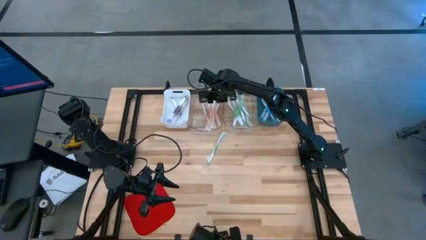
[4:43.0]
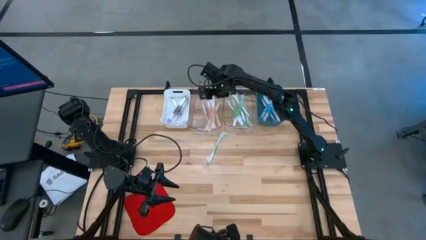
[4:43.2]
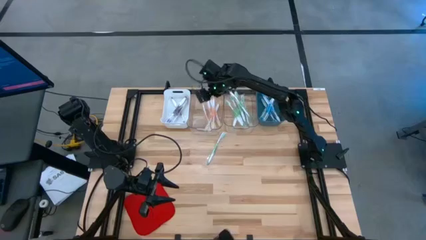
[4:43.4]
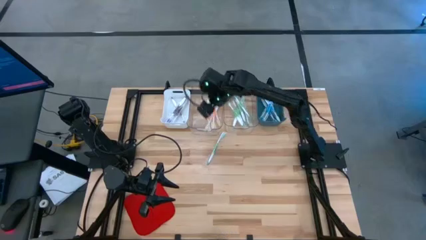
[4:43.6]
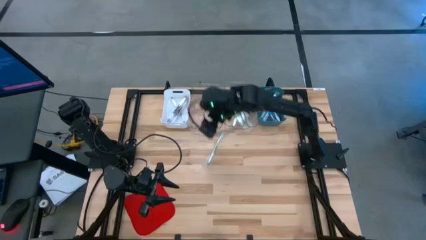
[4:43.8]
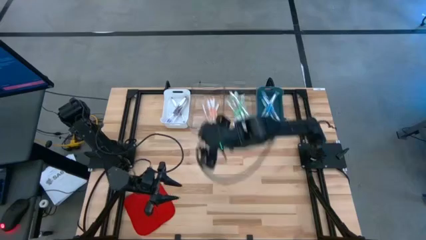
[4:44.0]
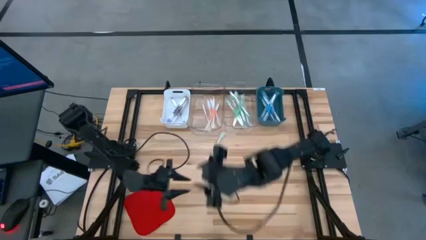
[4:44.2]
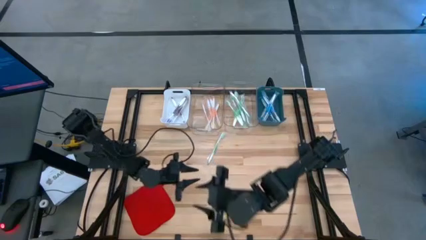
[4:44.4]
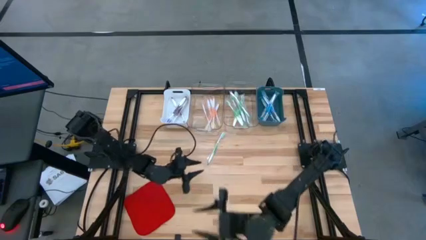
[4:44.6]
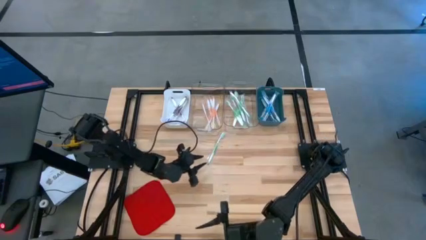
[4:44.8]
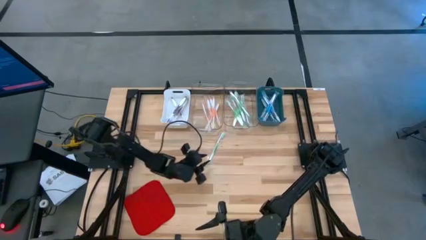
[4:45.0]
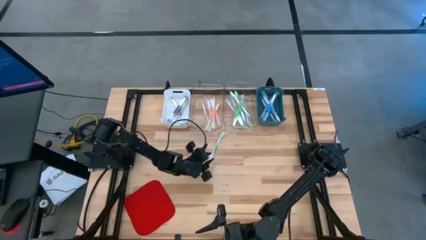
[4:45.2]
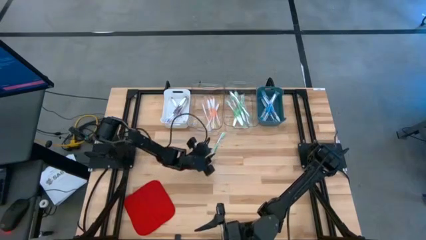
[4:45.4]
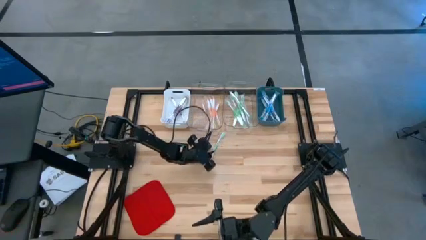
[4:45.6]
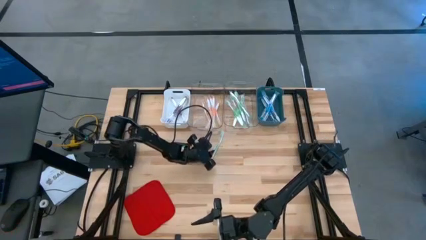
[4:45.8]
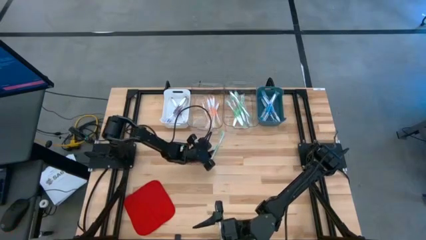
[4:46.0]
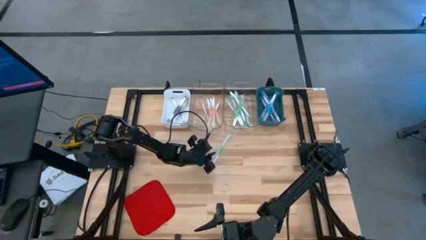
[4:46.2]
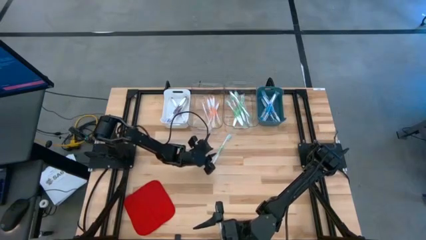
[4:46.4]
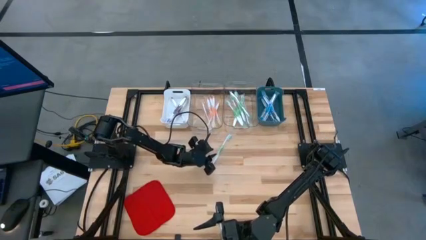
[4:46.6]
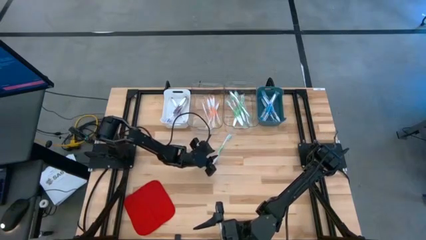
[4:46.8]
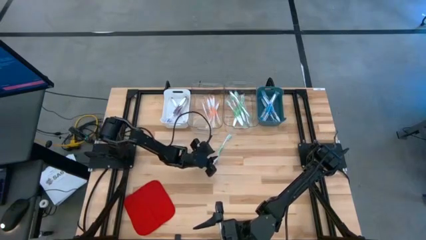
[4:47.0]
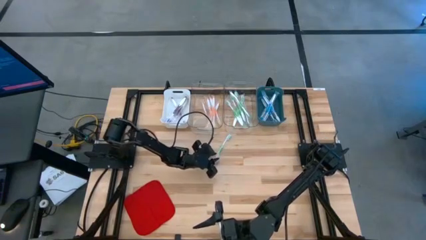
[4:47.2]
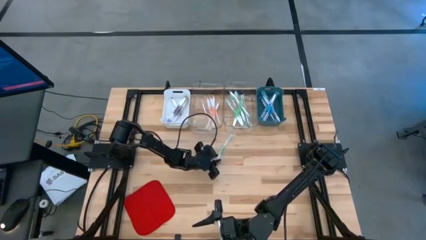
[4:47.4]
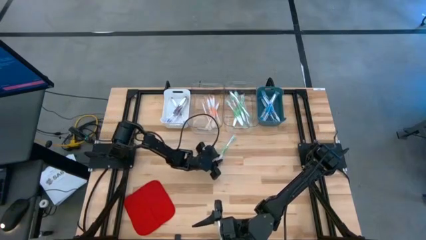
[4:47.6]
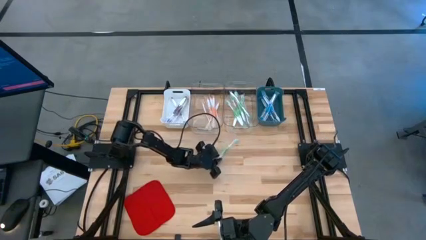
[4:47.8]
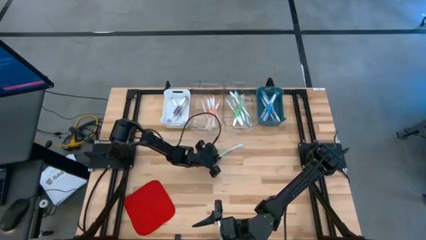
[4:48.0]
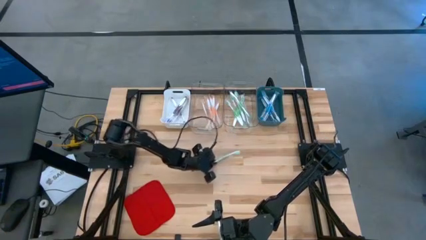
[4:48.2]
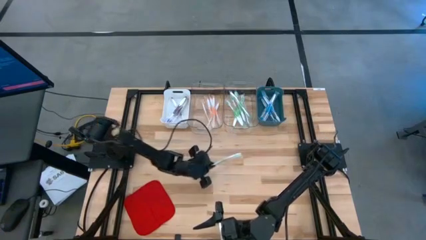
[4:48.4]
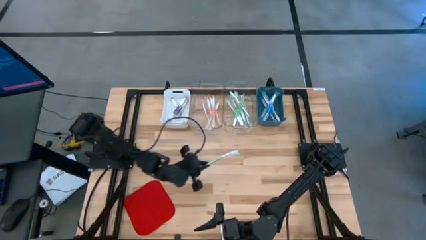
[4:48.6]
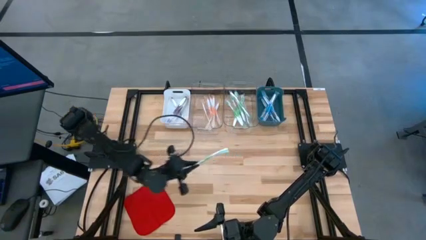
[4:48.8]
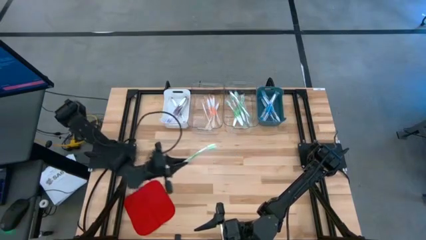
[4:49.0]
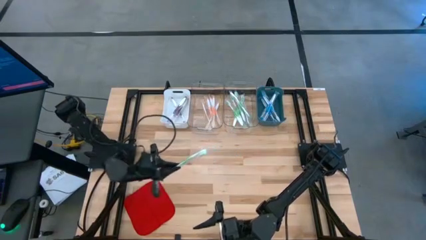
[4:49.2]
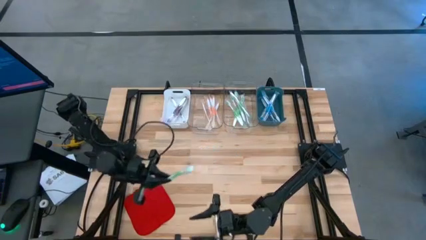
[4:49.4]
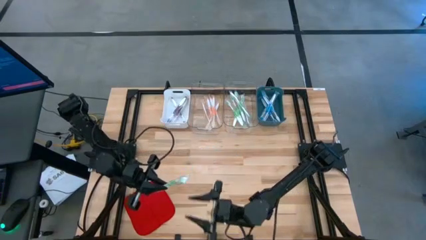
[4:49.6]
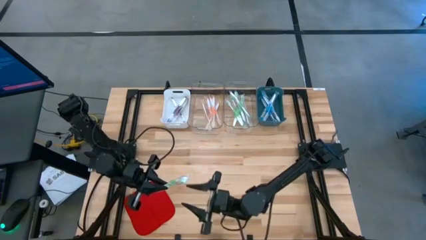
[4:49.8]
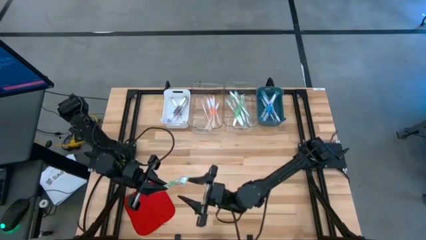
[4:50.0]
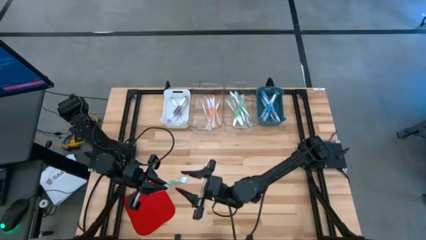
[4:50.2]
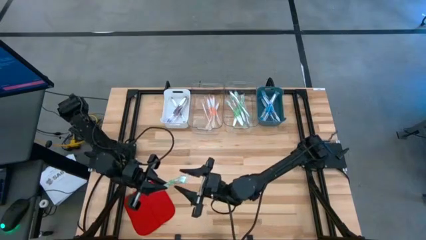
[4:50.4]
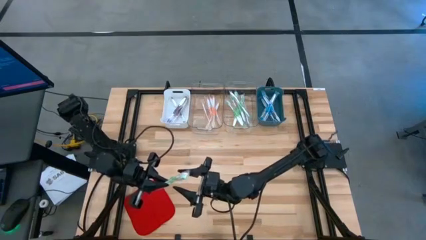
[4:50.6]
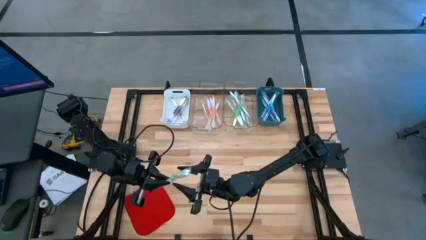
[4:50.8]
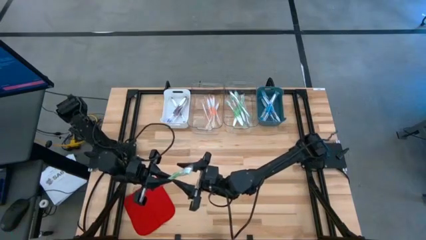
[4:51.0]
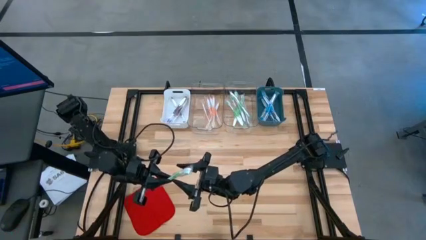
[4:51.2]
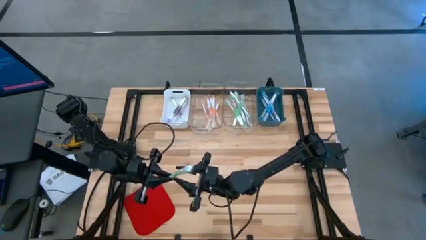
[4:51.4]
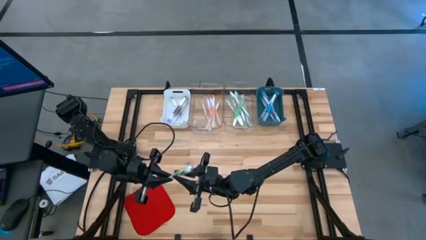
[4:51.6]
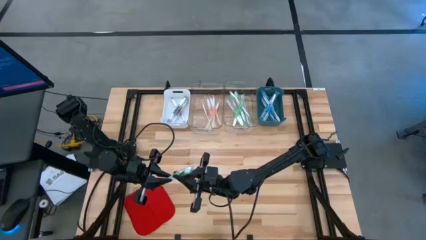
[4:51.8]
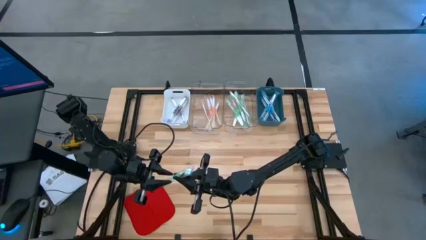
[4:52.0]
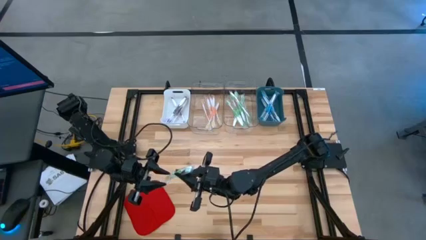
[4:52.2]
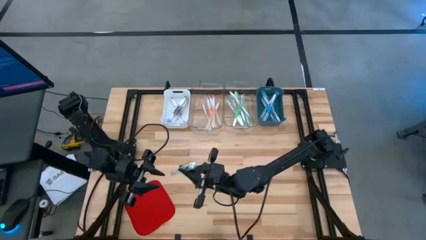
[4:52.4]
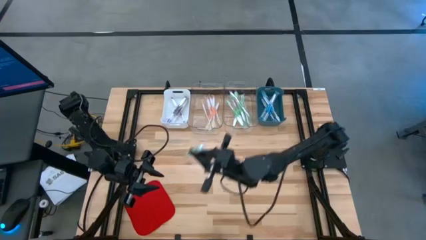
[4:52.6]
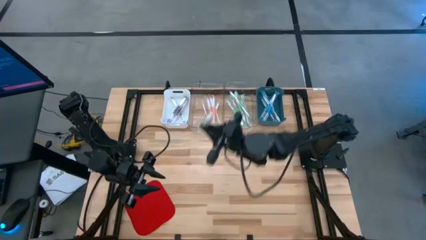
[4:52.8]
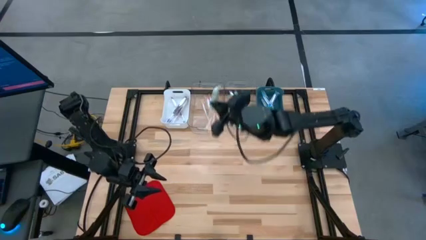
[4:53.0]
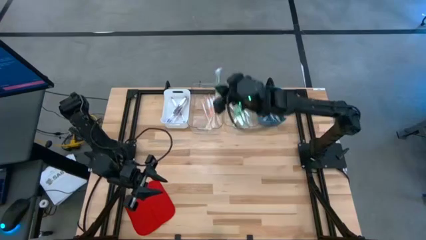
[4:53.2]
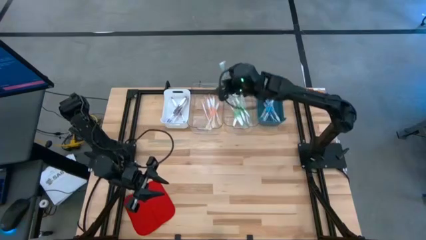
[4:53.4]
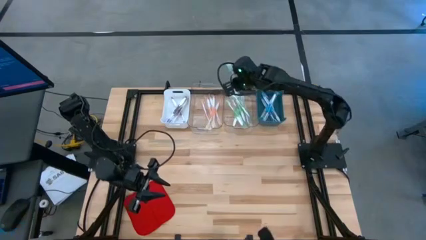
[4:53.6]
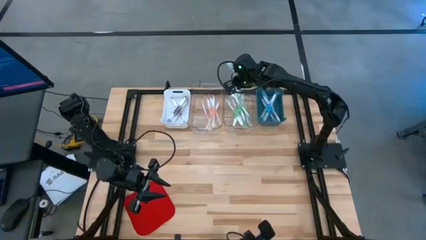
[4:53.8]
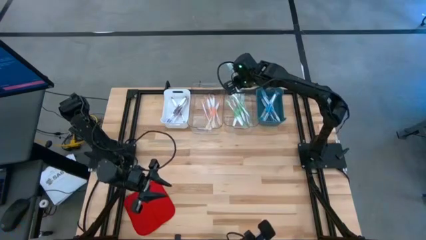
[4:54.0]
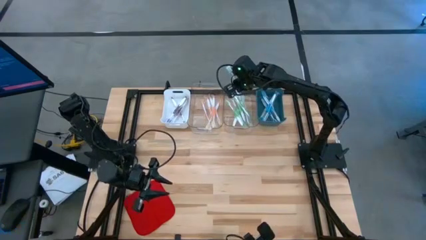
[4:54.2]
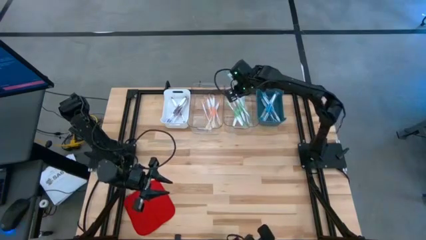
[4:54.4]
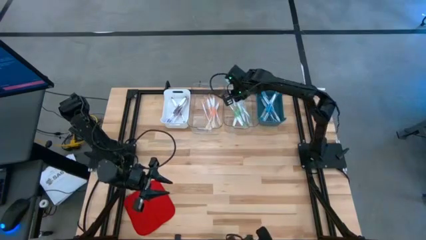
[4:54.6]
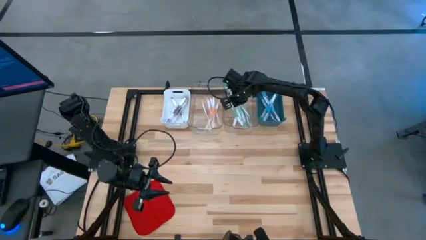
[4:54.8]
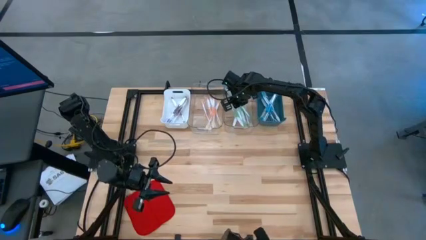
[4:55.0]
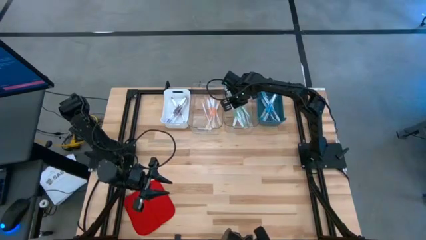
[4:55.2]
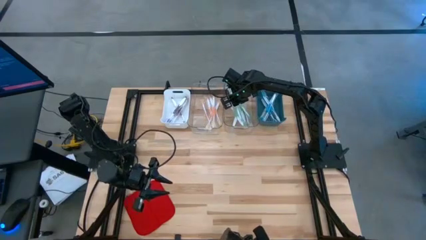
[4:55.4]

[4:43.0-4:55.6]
Task: Pick & Place Toothbrushes
Put the green toothbrush into the right transparent bin
